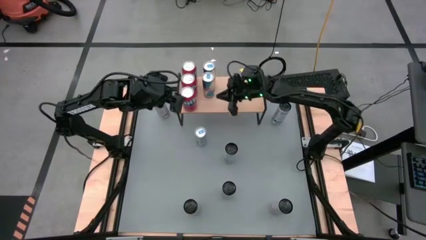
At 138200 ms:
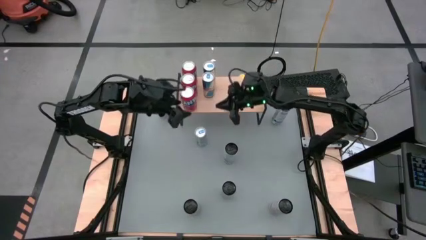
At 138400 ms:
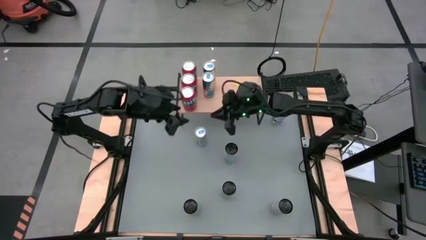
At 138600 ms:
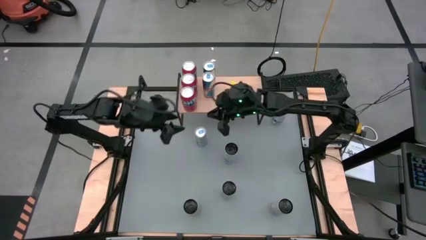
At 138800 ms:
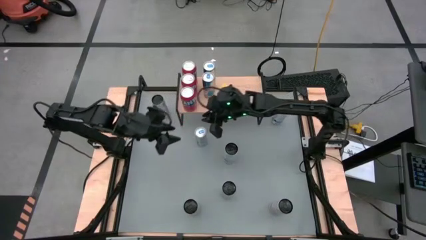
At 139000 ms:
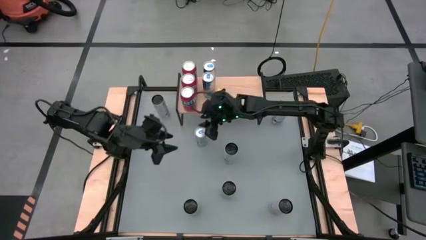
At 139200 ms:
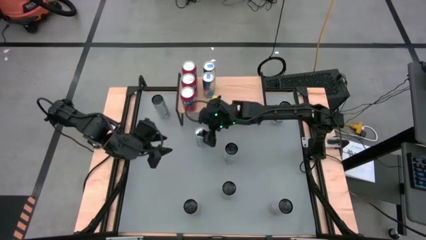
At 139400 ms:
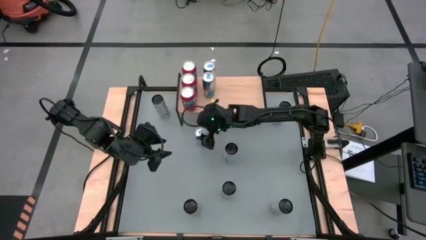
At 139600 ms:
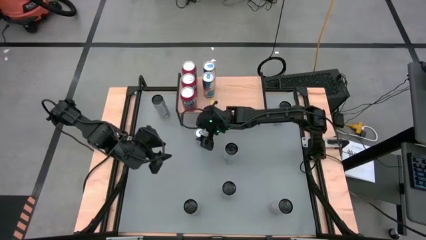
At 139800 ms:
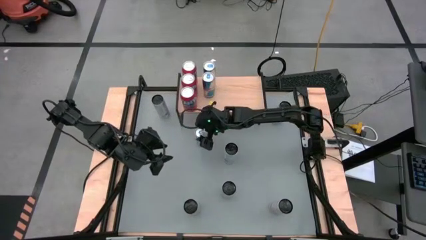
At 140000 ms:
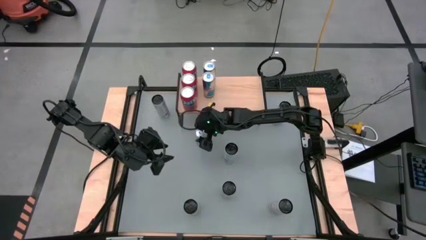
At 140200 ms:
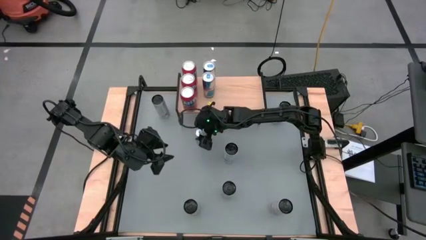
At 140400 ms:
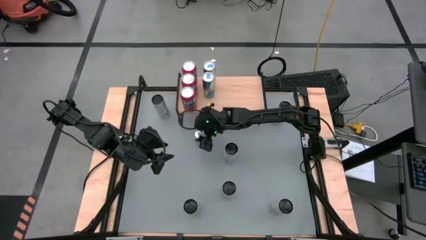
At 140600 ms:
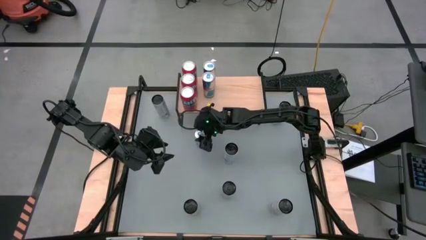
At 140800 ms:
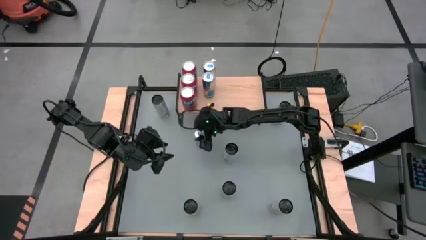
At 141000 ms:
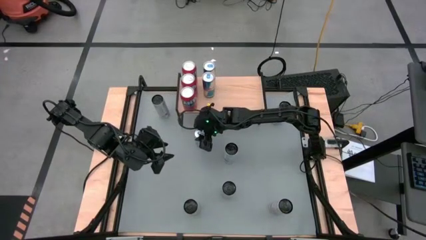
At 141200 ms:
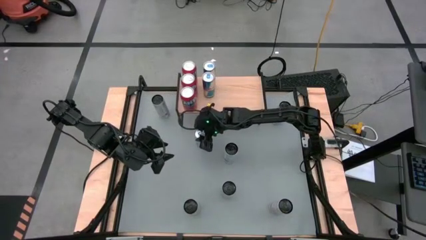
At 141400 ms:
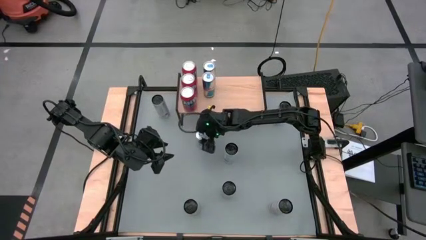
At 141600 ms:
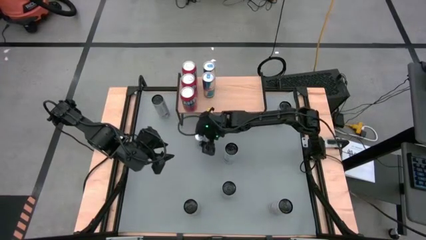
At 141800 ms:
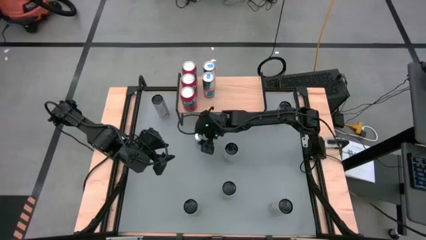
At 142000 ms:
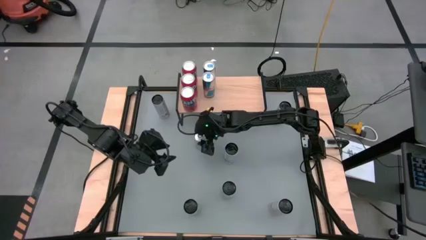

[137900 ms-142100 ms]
Task: Place canned beverage on shelf
Put the blue soda can on the shelf aligned with the other blue soda cans

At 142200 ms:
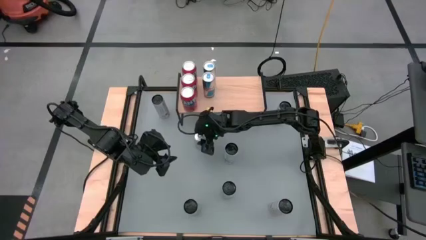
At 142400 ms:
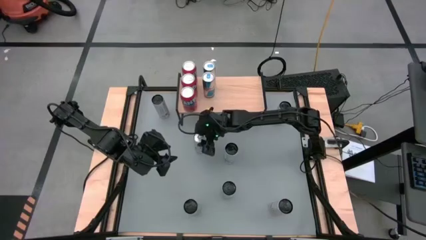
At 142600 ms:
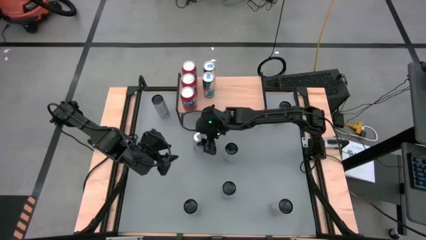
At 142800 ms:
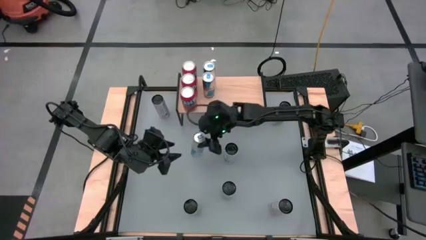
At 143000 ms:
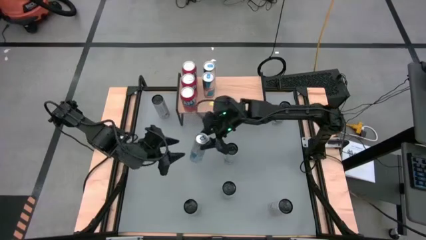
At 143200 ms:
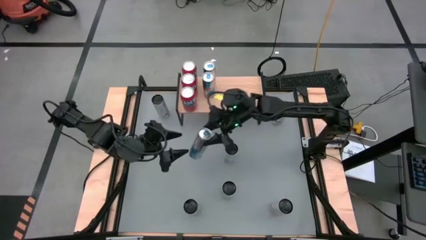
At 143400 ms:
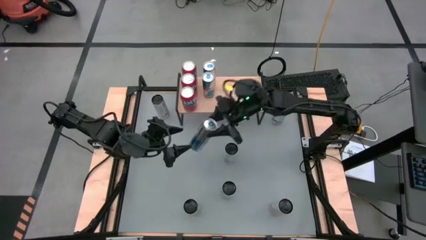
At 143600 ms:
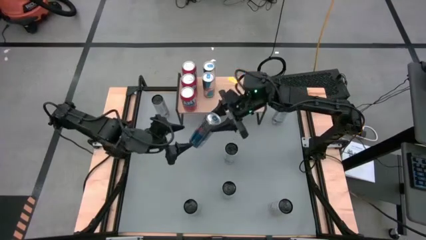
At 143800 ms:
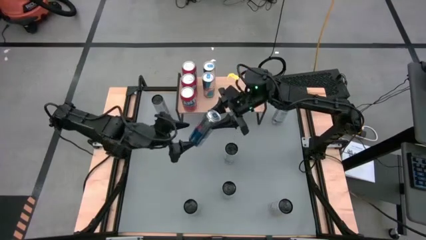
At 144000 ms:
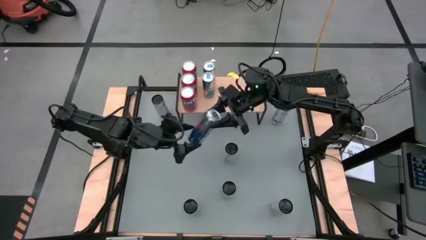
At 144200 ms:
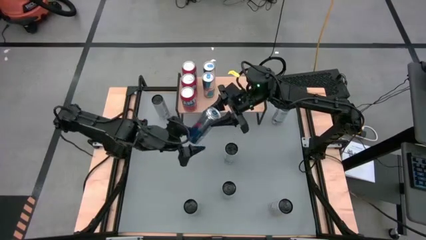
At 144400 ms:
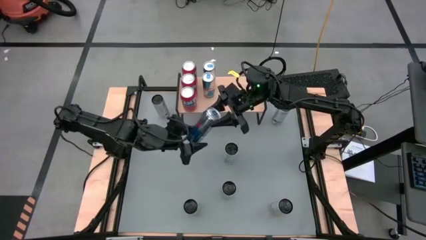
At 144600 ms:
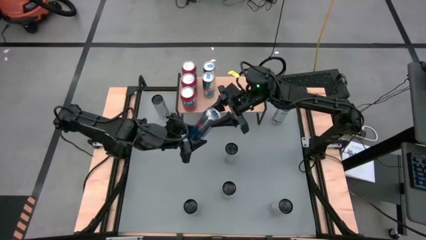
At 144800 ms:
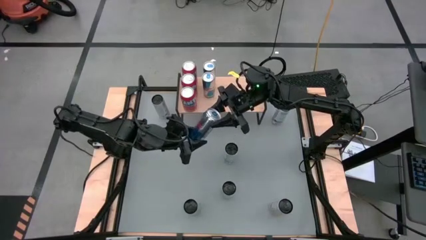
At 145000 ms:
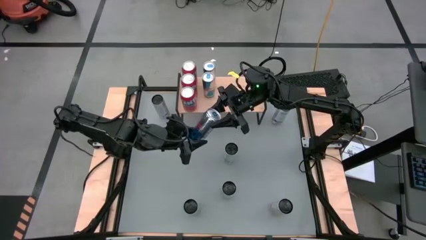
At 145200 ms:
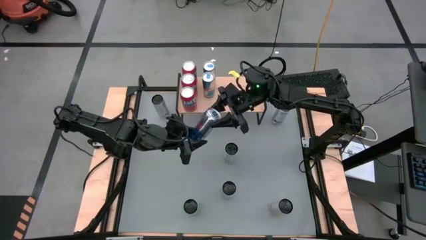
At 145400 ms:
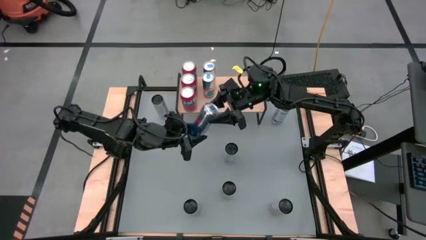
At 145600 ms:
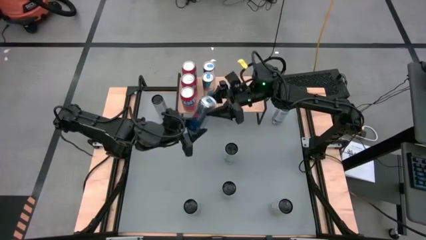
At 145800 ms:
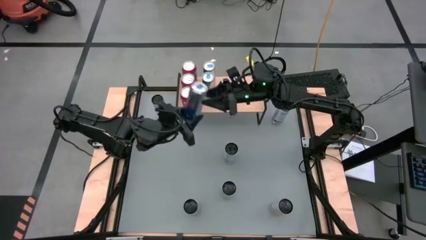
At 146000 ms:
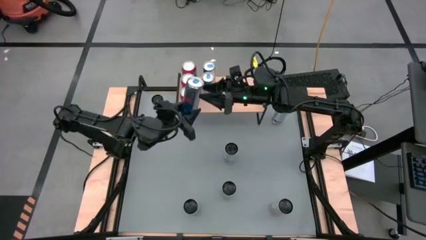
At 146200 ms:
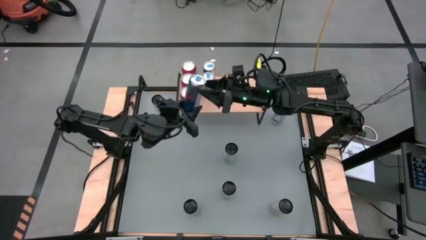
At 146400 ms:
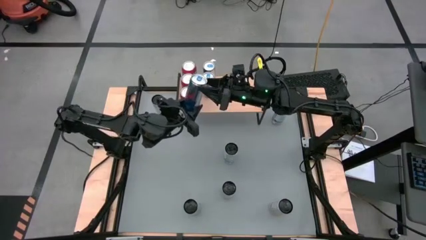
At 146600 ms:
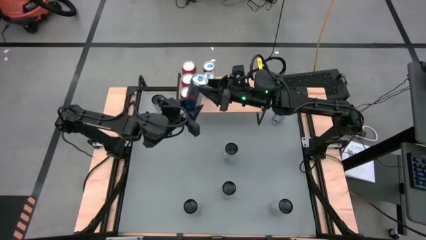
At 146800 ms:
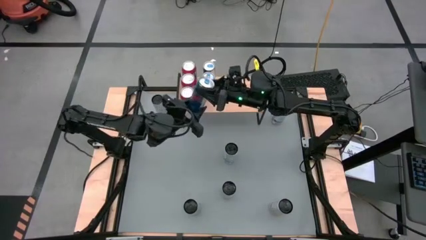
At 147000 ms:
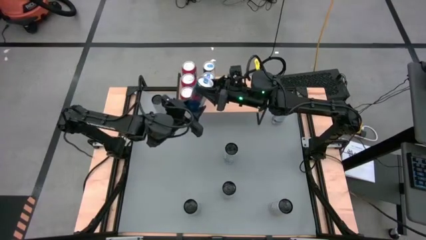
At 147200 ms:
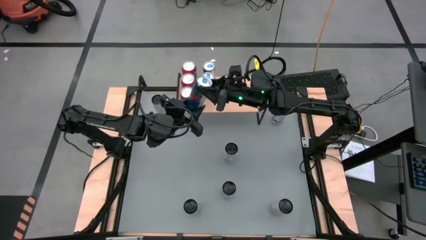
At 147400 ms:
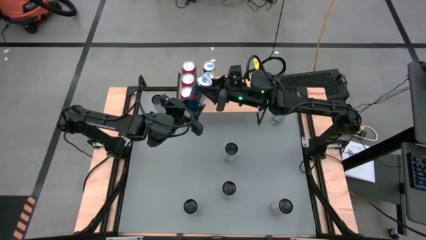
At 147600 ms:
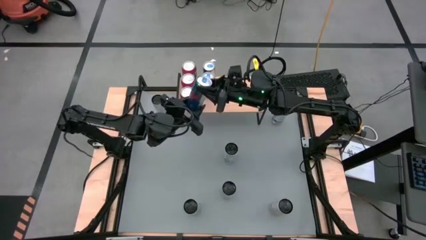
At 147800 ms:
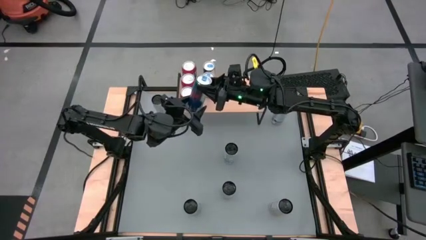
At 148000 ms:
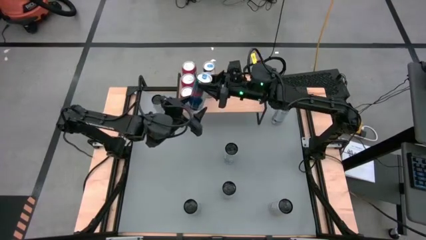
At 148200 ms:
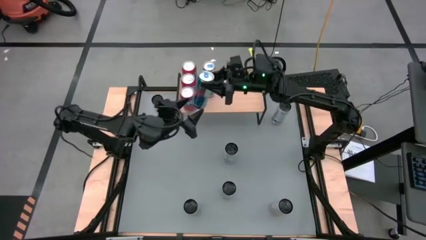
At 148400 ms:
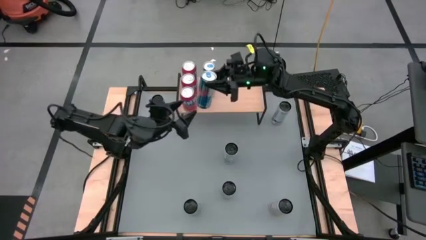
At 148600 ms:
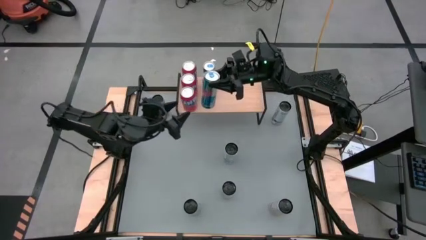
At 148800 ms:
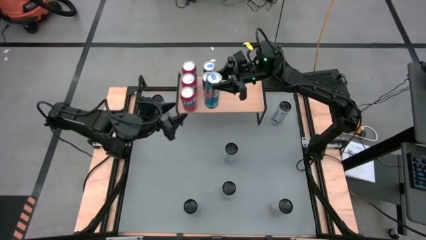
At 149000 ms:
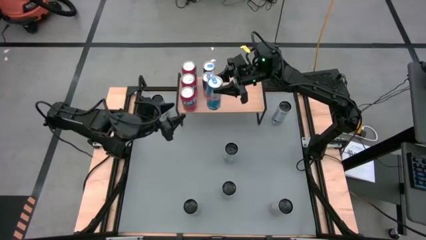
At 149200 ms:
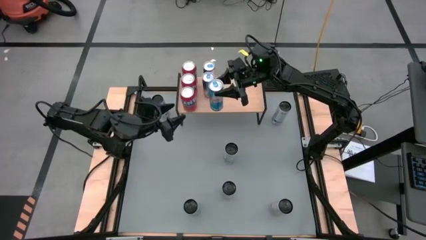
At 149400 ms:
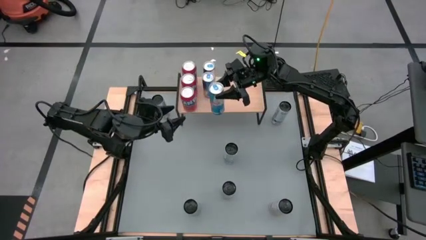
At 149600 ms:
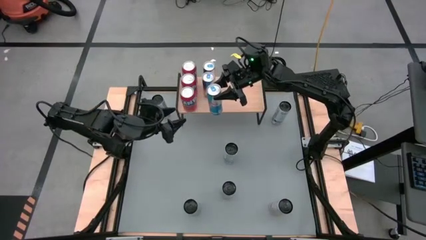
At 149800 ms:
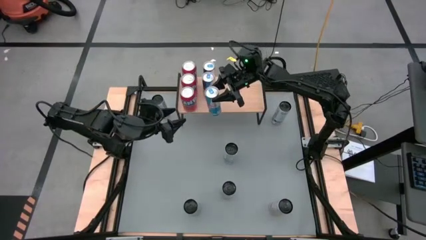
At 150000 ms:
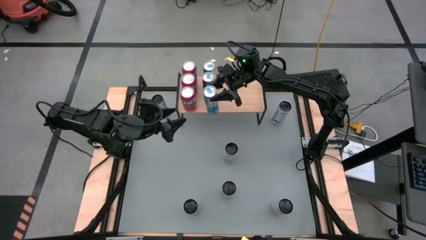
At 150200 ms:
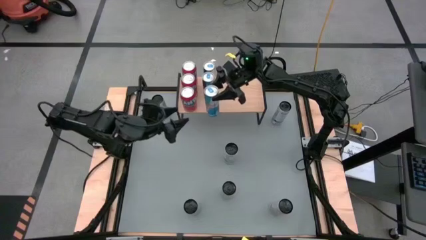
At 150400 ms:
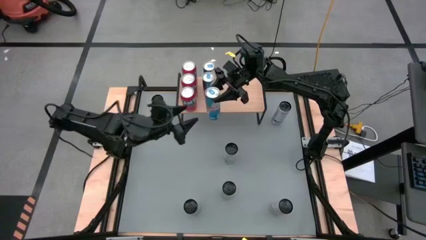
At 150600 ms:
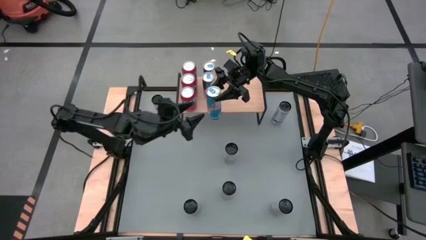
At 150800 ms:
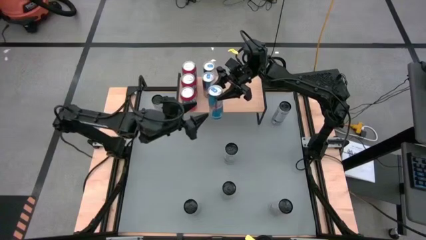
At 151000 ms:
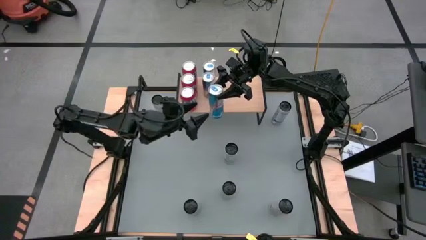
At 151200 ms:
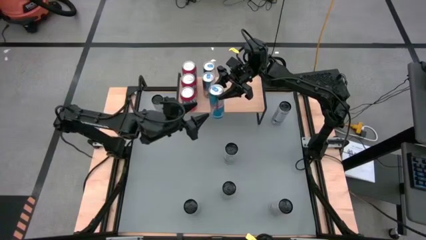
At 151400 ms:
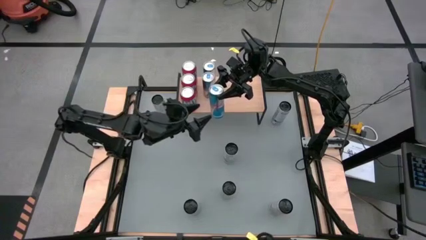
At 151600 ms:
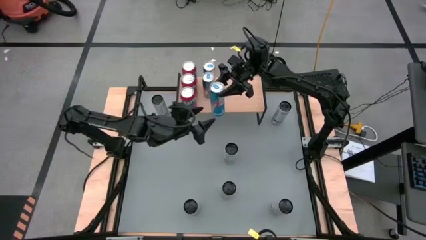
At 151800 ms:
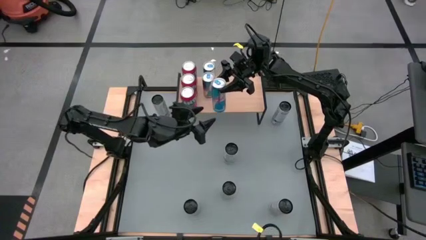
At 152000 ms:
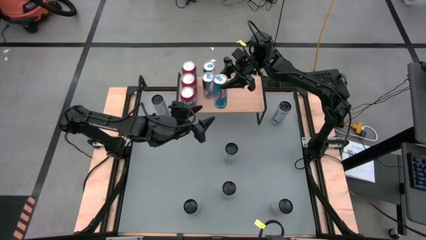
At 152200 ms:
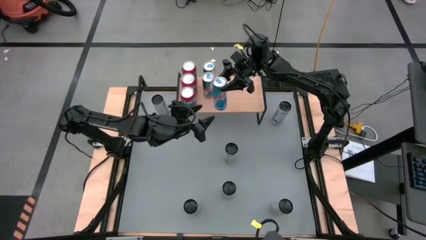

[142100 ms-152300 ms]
Put the blue soda can on the shelf aligned with the other blue soda cans

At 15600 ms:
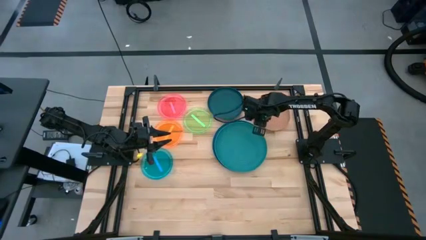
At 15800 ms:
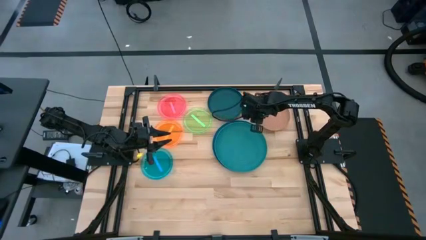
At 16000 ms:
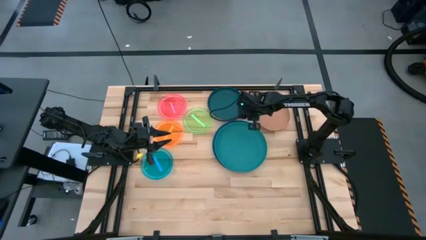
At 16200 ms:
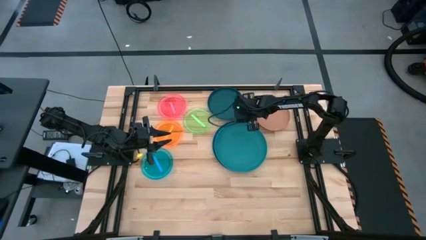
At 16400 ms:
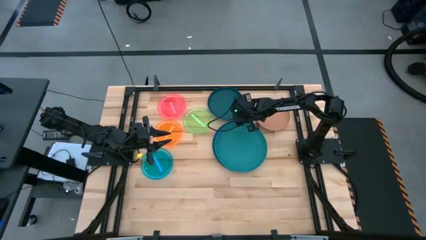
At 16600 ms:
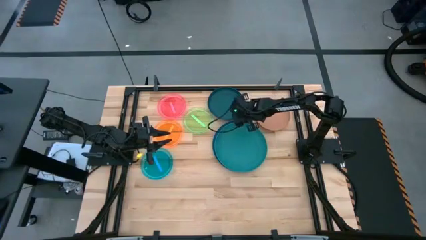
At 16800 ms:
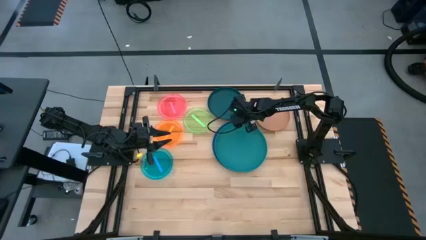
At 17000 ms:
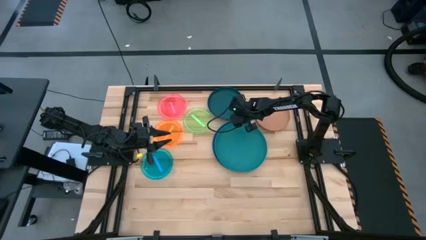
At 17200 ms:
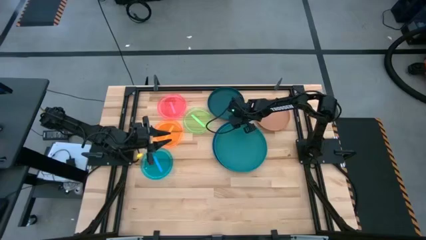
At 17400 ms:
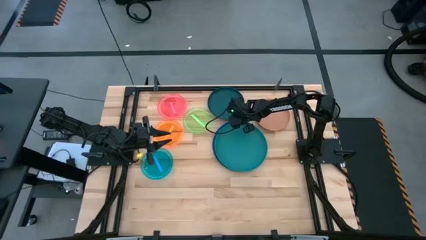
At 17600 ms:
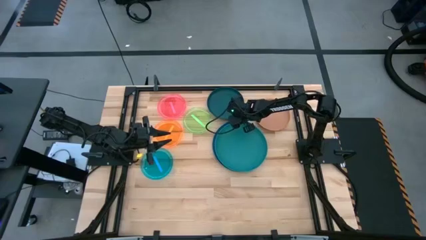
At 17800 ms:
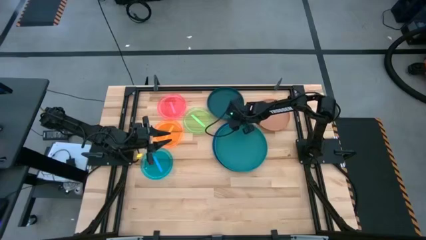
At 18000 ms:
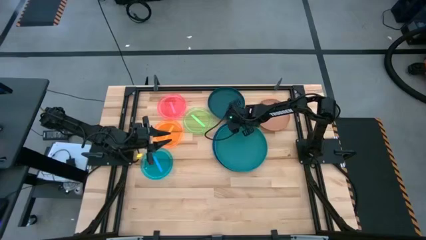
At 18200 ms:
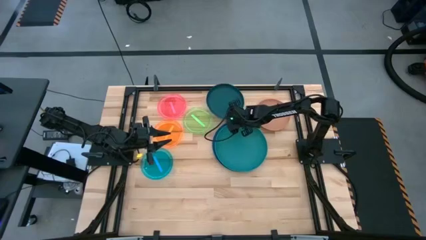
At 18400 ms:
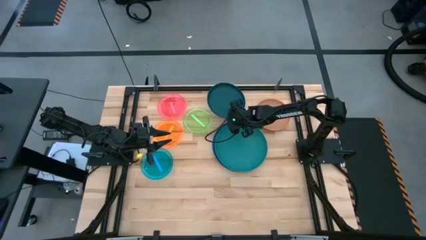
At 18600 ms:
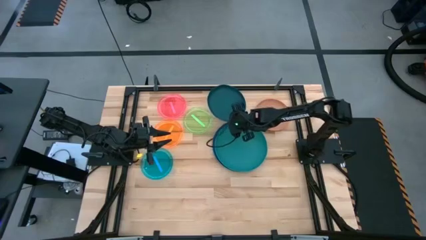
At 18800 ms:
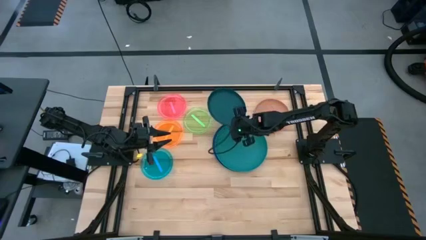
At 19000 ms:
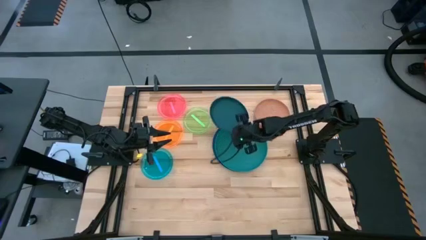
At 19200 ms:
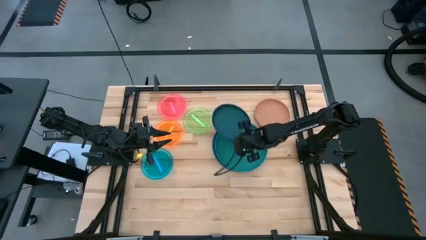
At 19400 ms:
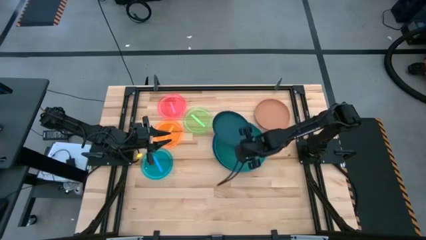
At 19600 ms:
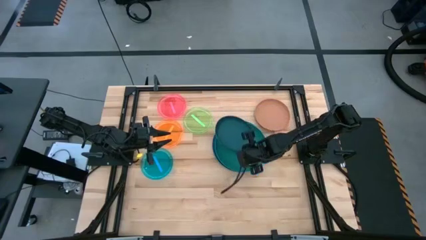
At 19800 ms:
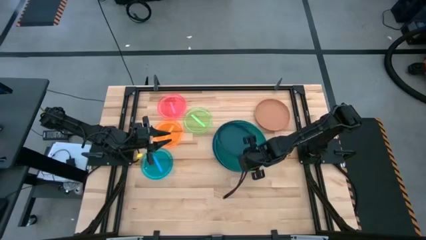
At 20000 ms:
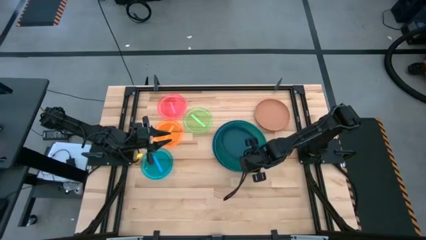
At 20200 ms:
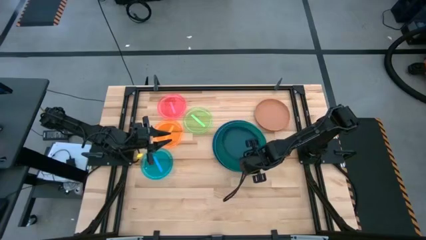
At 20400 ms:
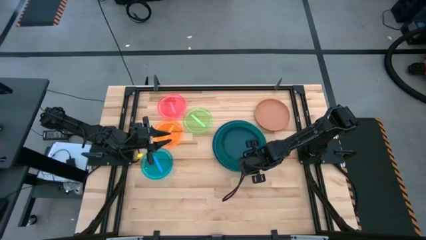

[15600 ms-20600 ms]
Task: Stack plastic plates
Stack the dark blue plate on top of the green plate
